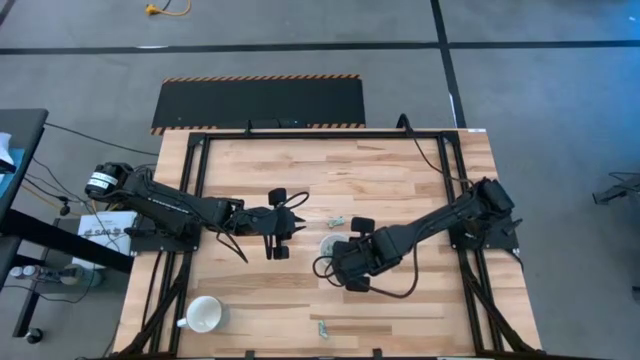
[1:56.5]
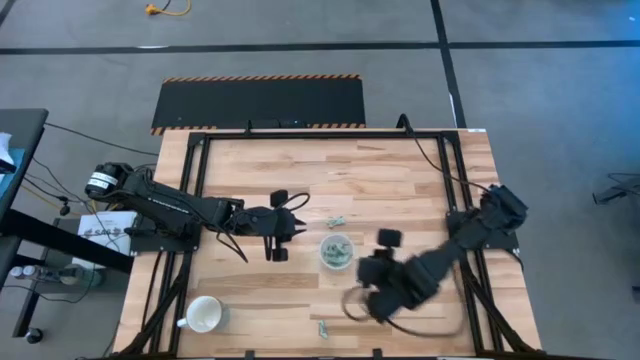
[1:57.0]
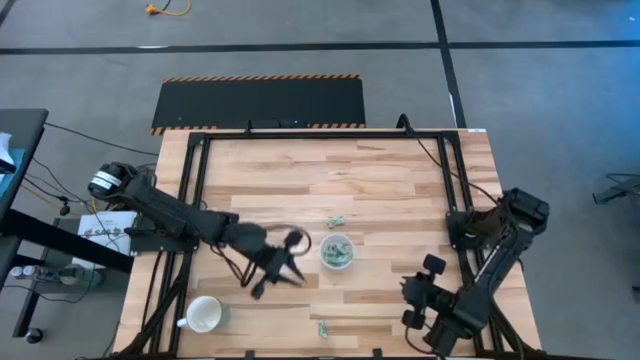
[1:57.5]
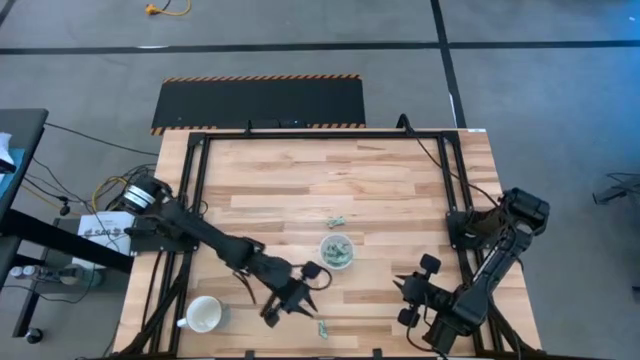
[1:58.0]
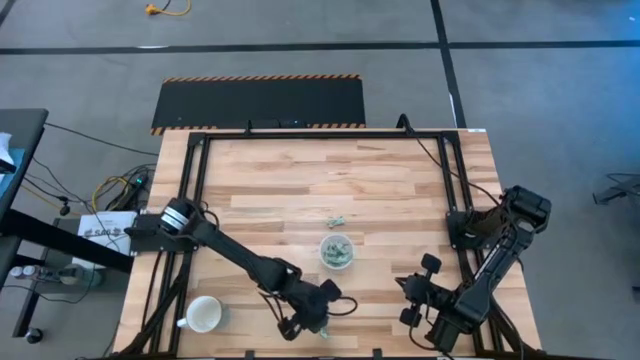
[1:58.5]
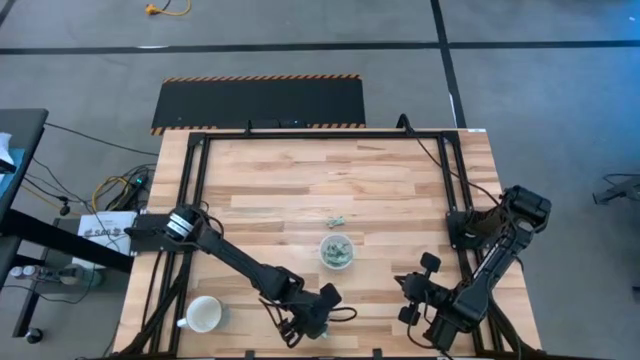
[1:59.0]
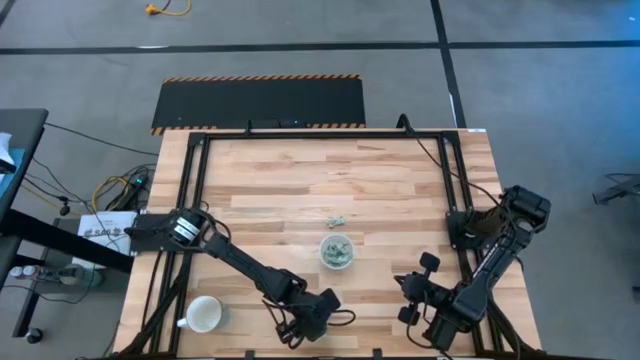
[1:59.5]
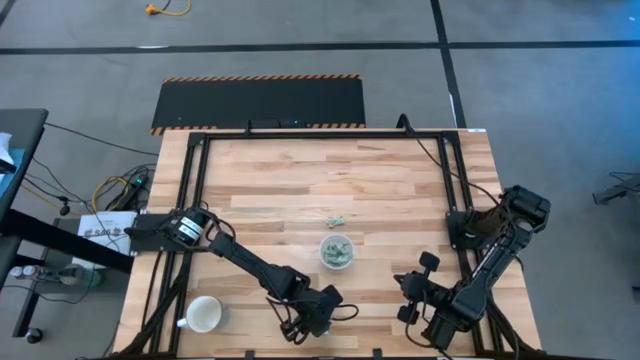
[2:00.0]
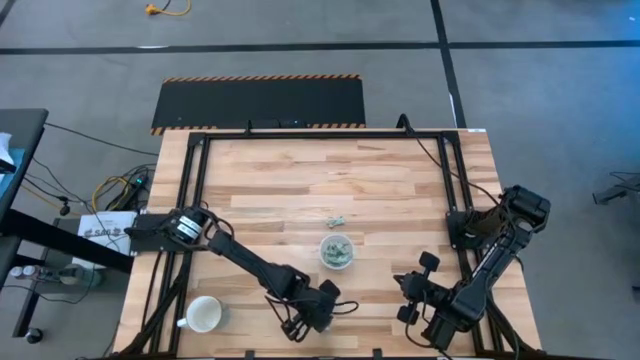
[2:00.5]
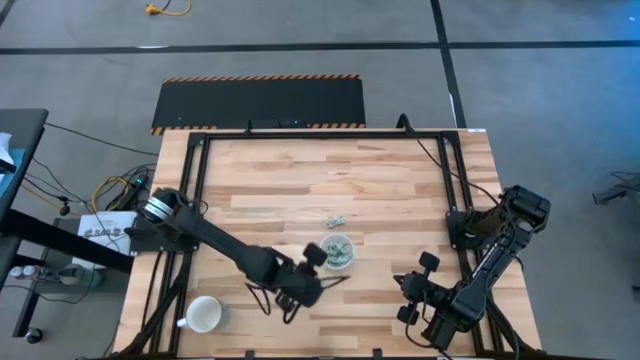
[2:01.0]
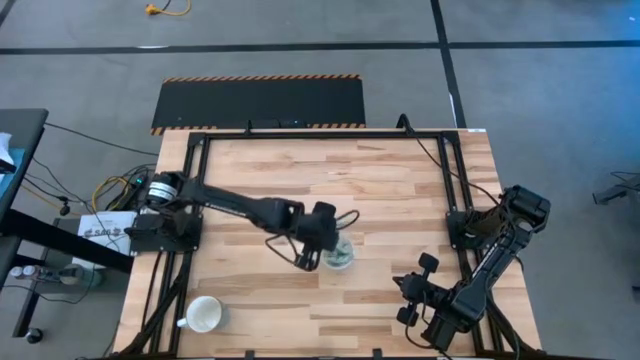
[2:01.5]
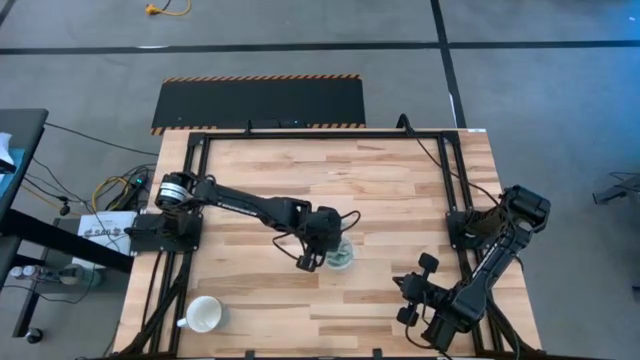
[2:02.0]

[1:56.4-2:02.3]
Task: Pick and place Stevia / Truvia into bins
Put the stevia packet into the transparent container

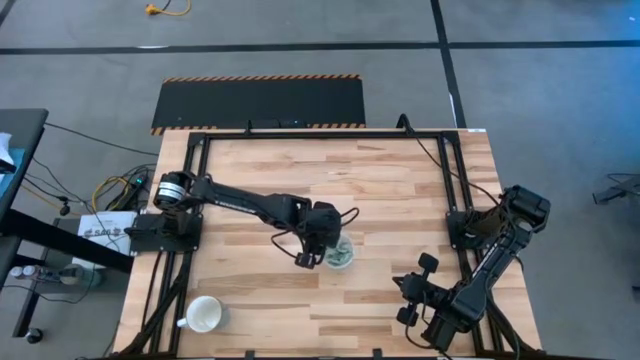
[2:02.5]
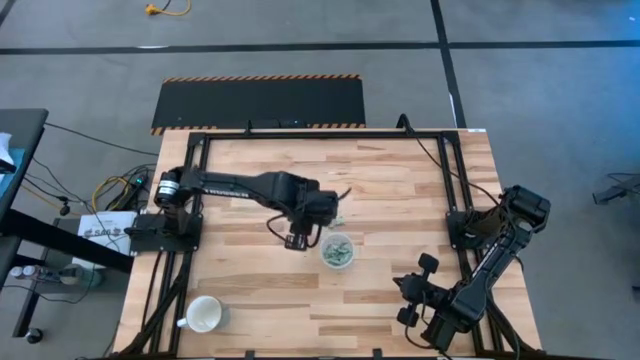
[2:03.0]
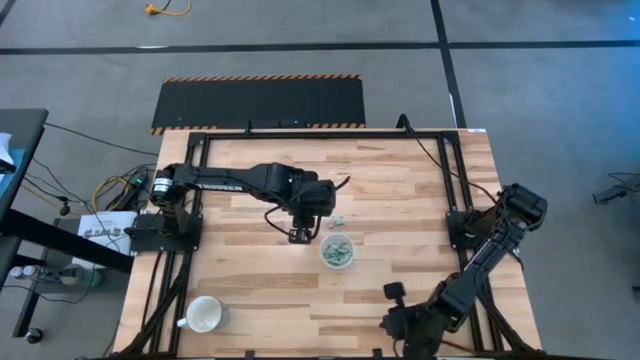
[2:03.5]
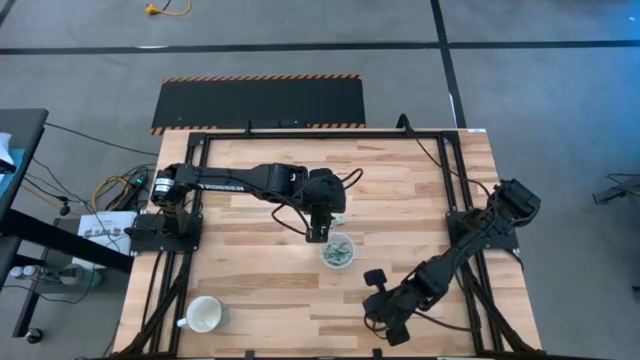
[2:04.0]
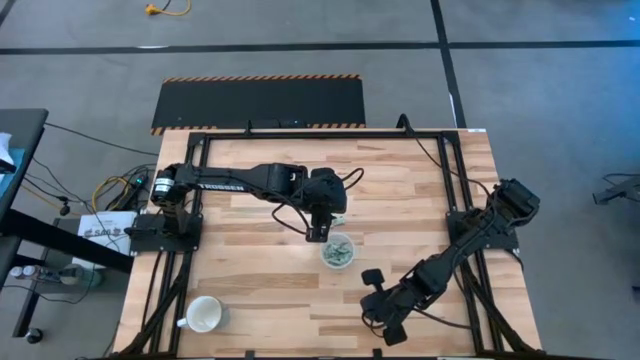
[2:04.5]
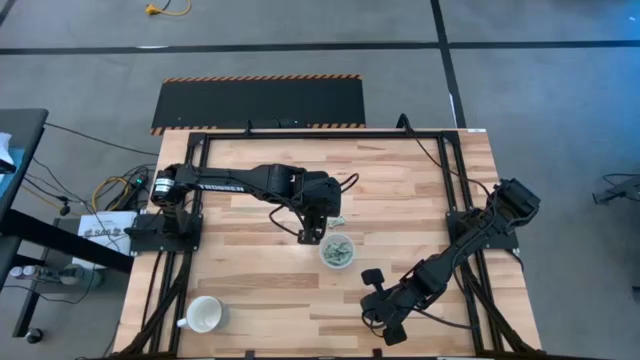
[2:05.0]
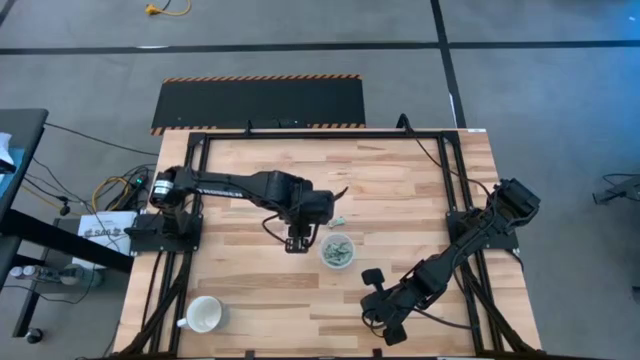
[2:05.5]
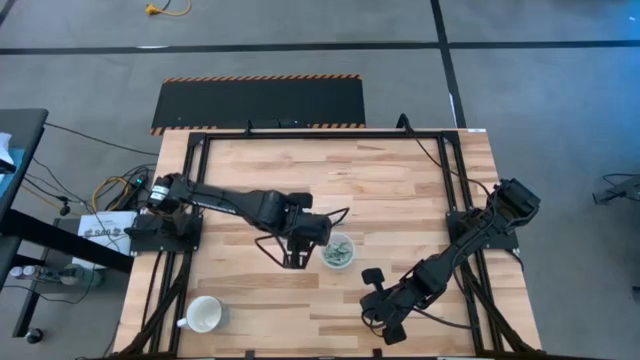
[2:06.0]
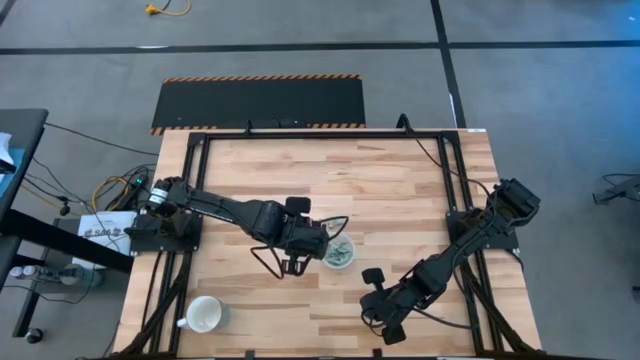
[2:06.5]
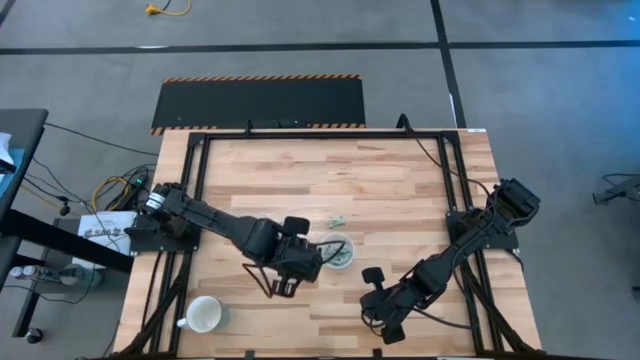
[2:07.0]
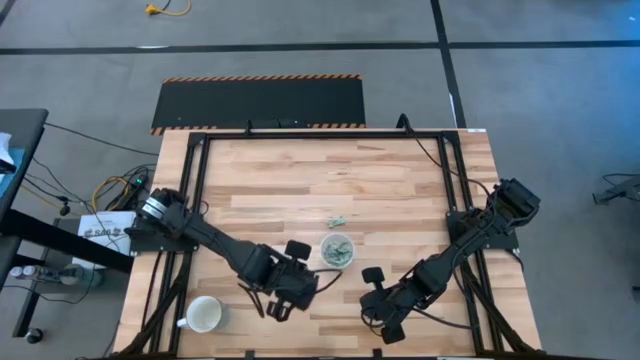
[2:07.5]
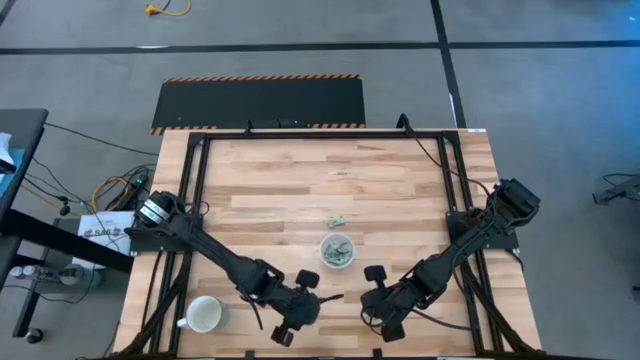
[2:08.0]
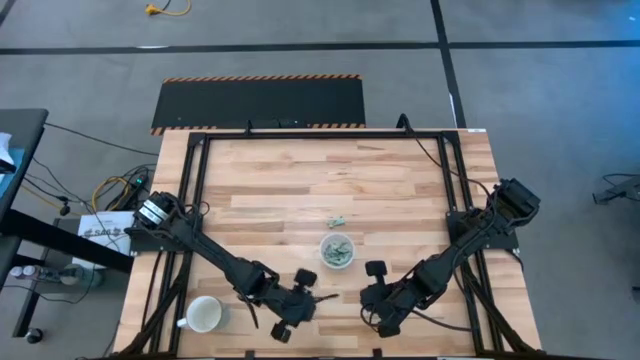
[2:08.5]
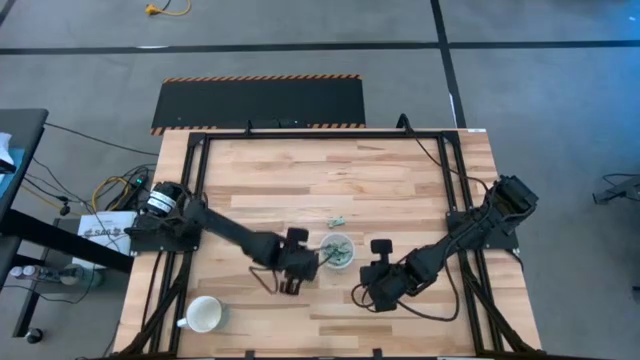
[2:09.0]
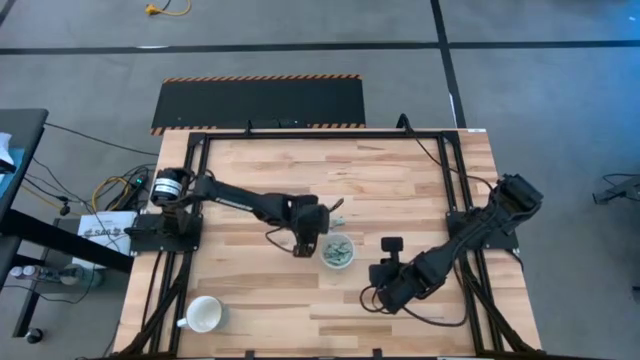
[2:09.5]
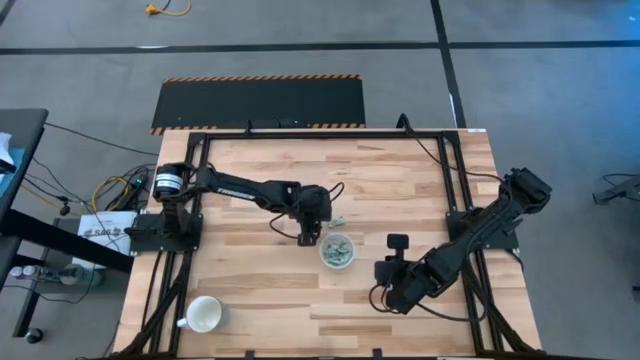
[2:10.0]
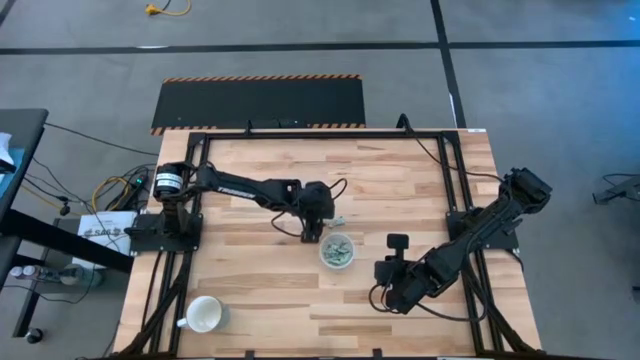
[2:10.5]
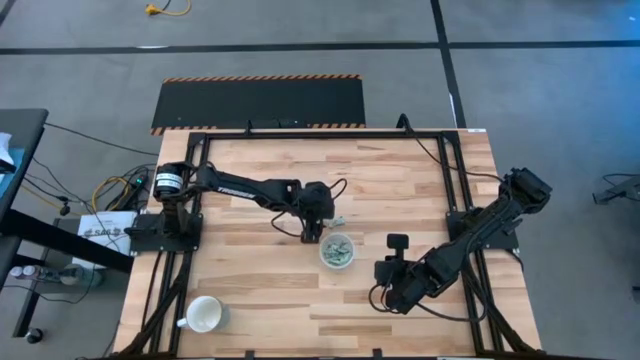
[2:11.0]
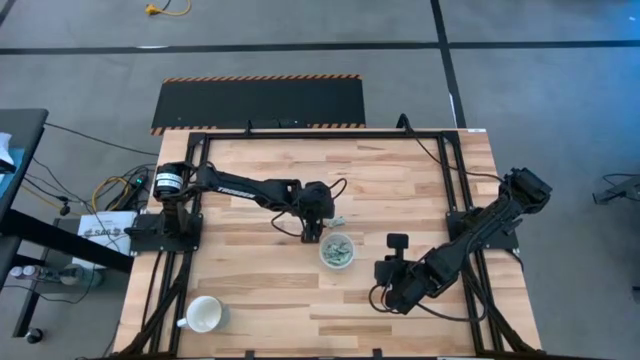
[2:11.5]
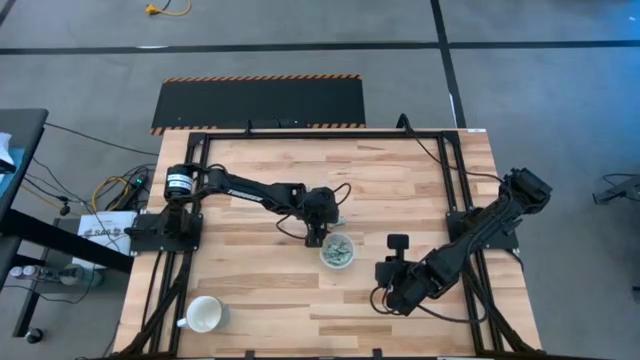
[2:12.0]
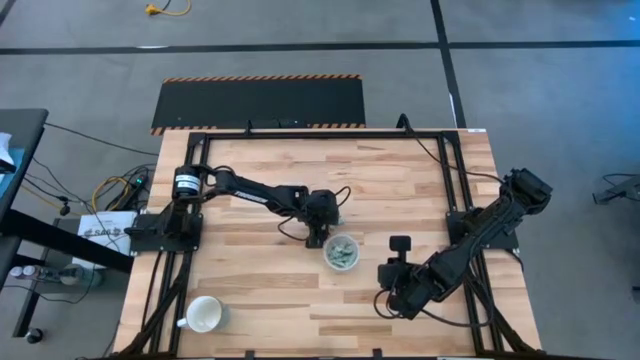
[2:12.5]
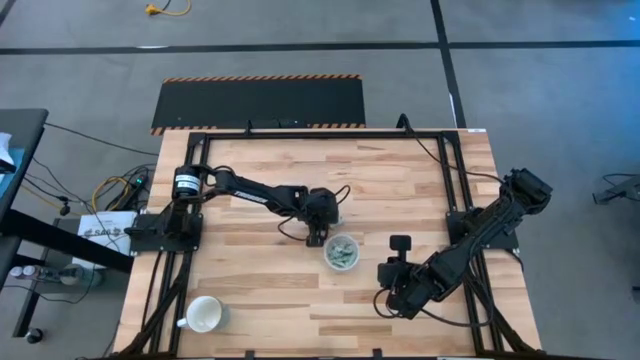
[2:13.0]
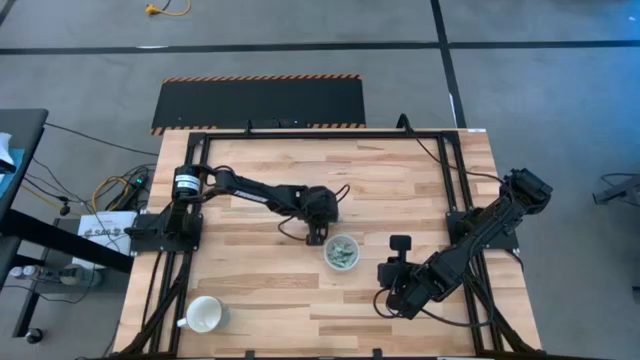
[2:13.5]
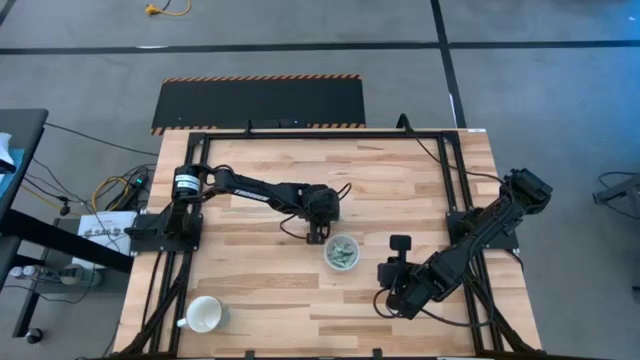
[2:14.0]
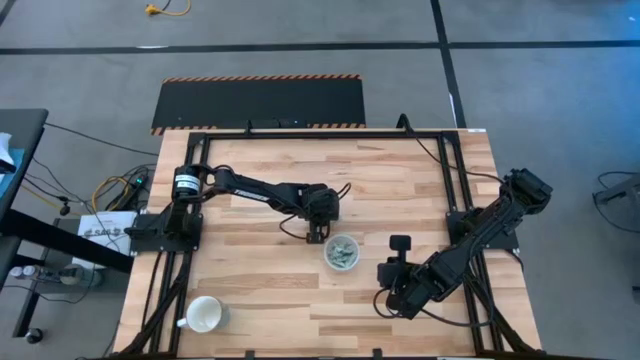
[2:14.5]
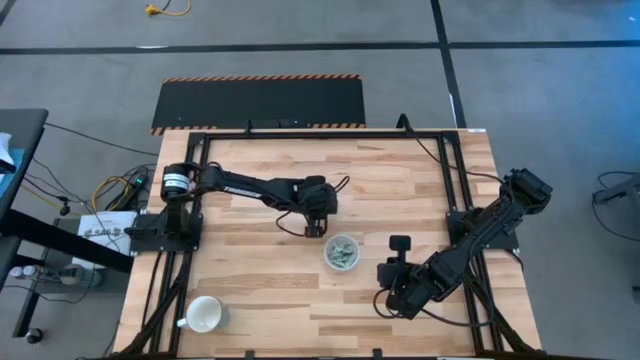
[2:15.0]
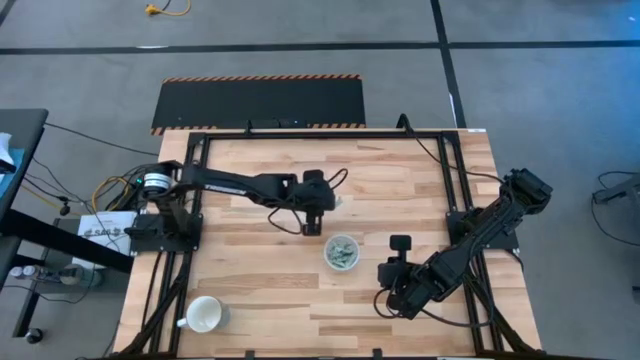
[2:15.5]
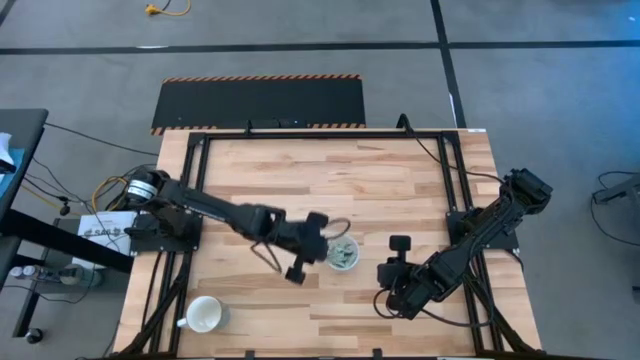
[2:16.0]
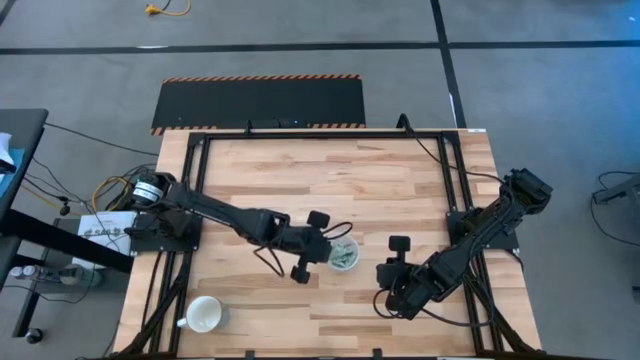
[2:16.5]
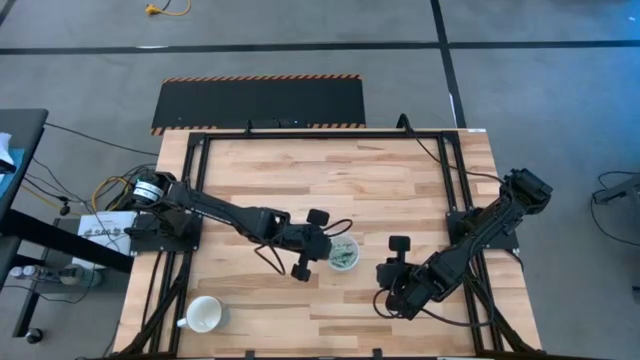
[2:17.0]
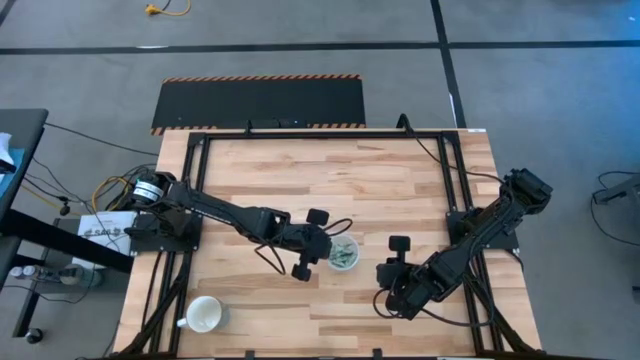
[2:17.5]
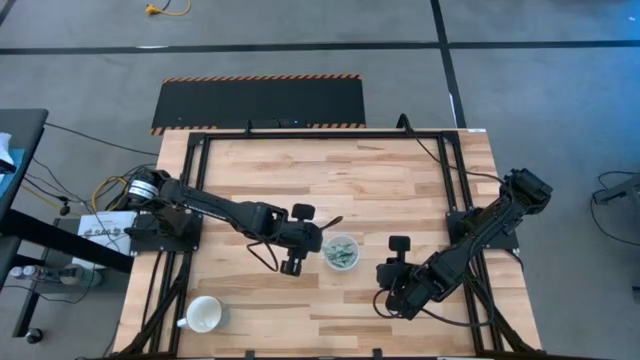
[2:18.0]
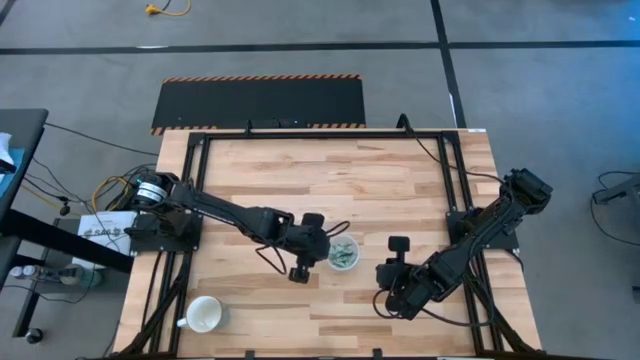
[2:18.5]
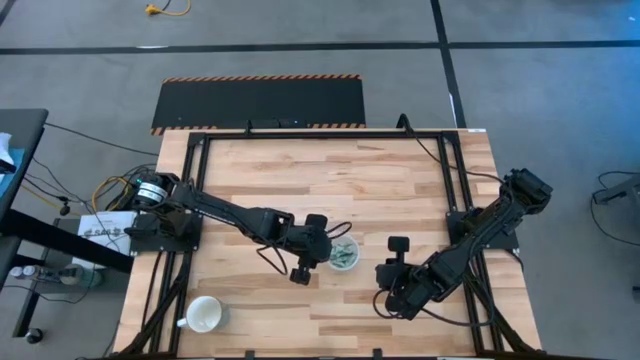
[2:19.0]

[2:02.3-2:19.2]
Put the stevia packet into the transparent container
